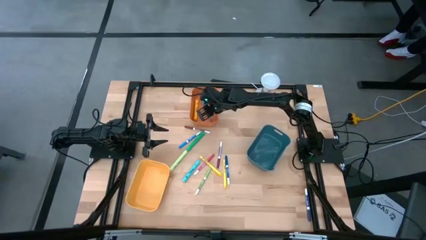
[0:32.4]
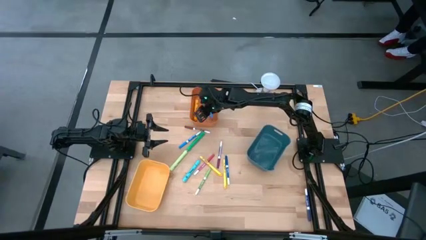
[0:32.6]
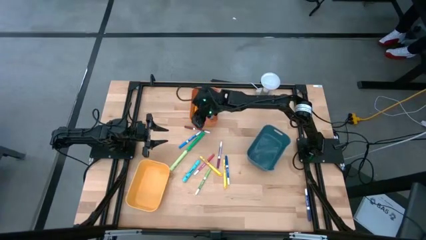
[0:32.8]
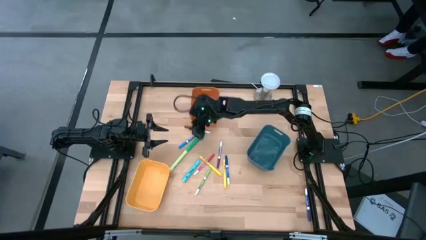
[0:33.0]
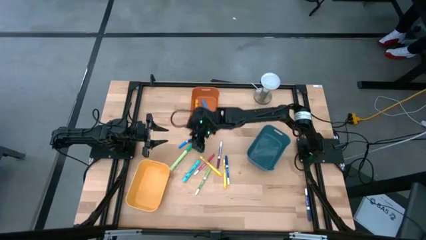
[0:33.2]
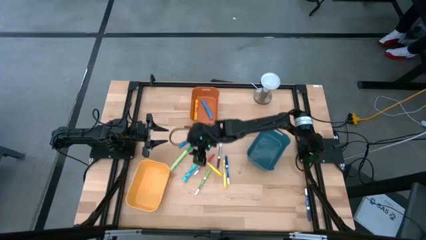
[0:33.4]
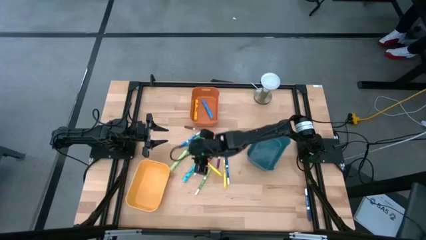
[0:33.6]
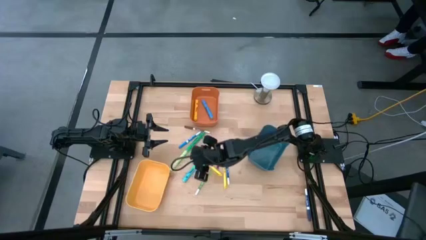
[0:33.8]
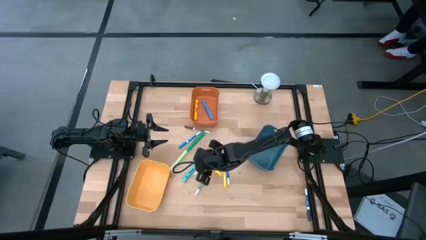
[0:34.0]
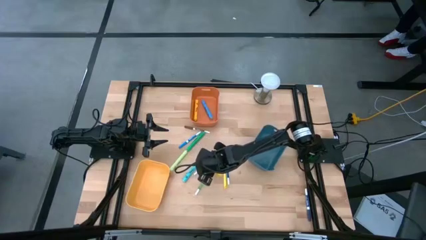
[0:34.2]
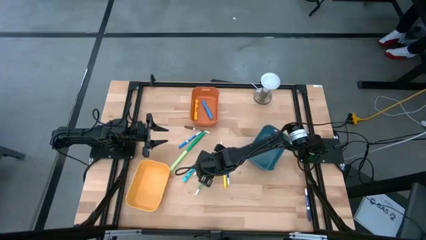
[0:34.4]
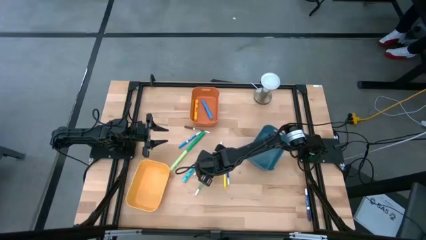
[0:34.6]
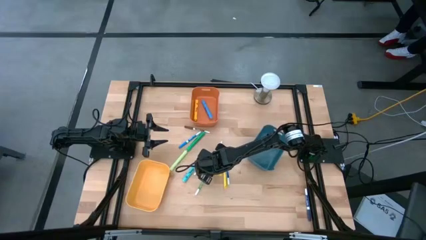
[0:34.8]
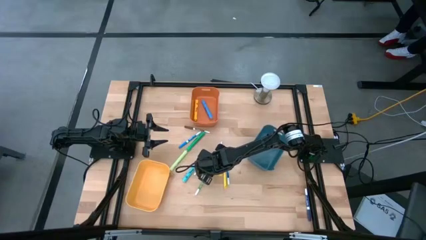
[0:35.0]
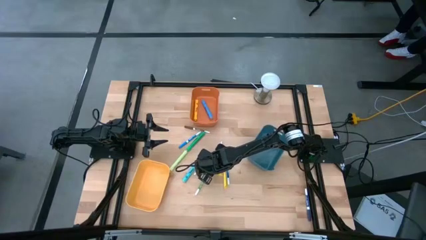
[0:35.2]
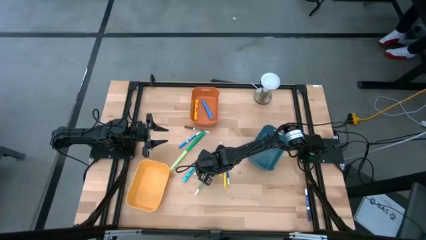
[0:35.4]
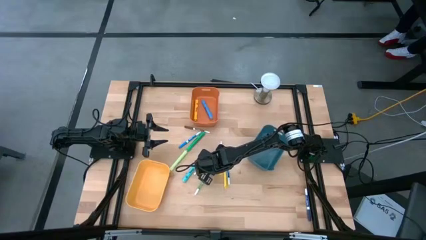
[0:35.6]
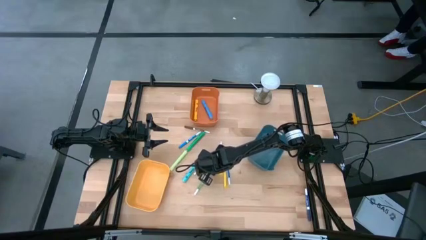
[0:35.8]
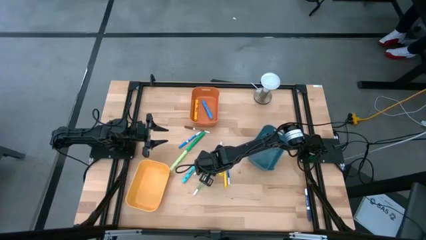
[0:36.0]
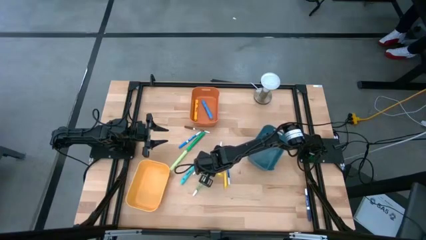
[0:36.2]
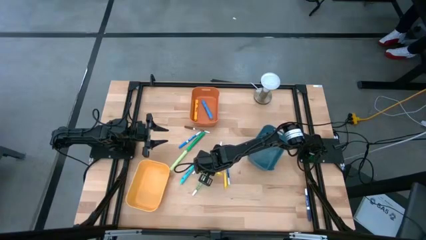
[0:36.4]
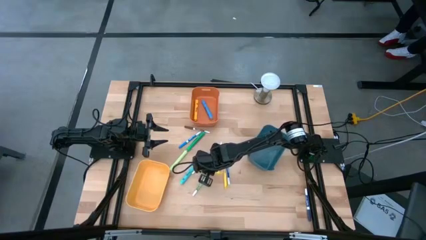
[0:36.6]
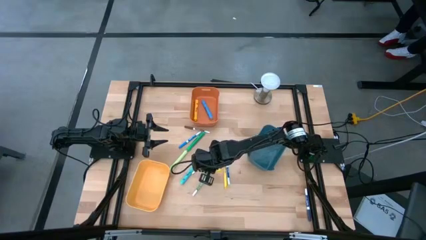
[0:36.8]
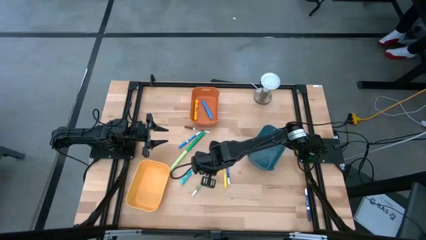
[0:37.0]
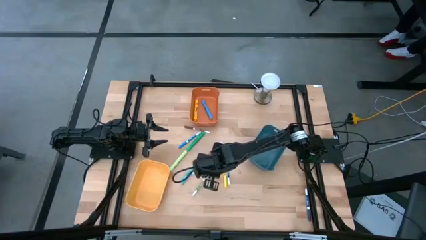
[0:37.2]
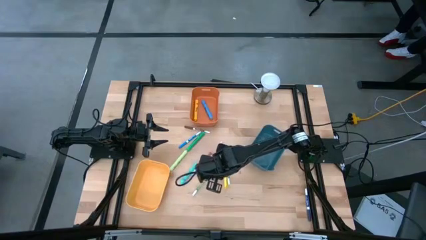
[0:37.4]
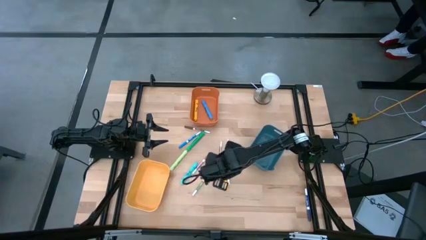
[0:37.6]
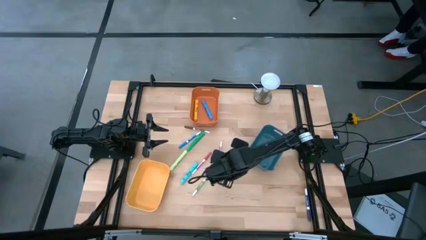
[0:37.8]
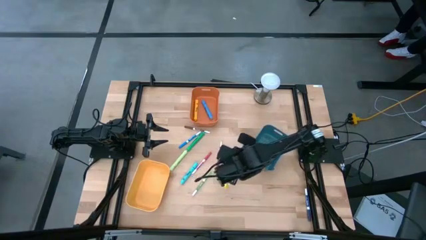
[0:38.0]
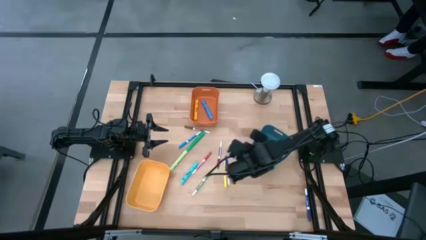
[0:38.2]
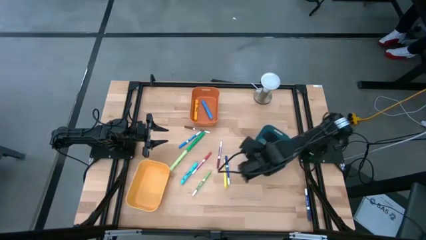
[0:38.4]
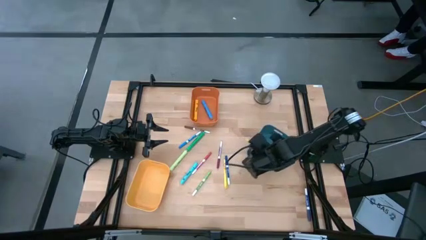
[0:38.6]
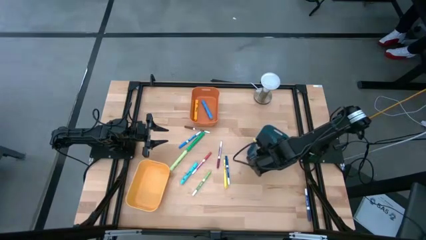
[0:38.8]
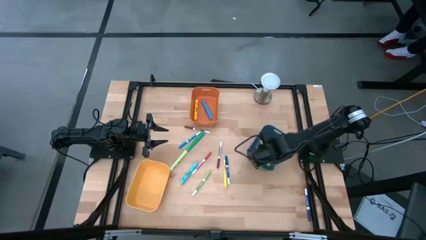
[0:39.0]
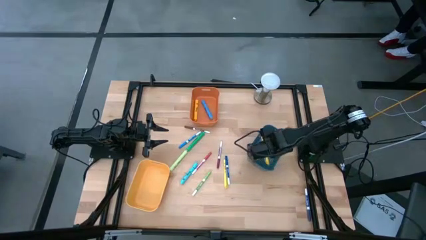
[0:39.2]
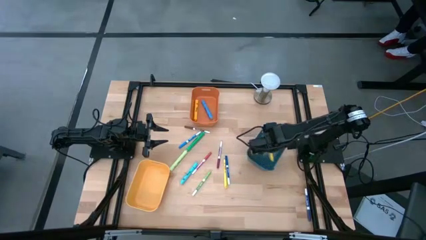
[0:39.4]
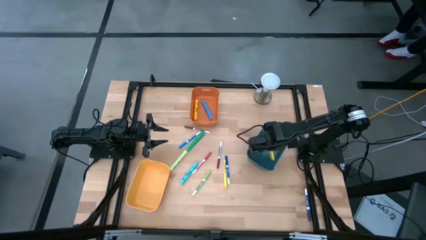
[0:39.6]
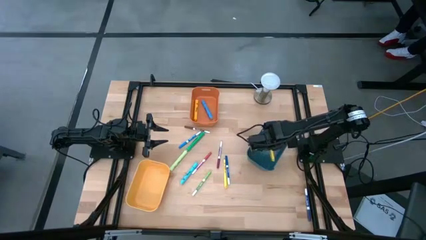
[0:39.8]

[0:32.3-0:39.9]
Task: Pick & Place Markers
Put the left yellow pen into the blue bin

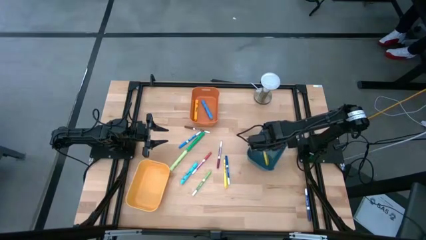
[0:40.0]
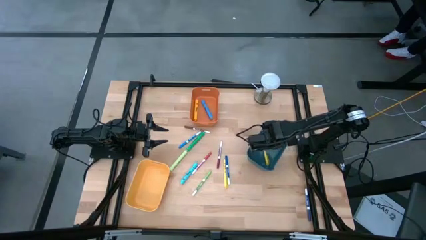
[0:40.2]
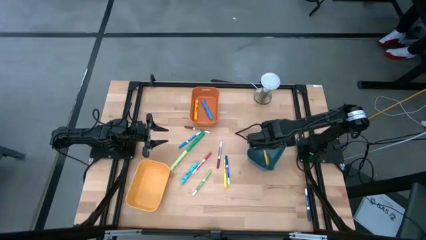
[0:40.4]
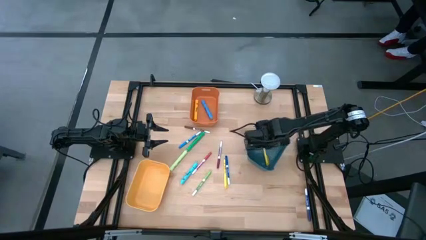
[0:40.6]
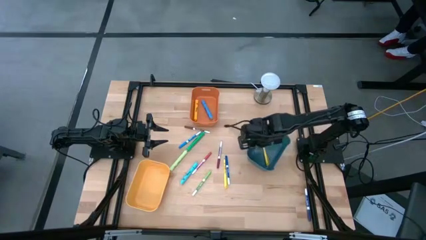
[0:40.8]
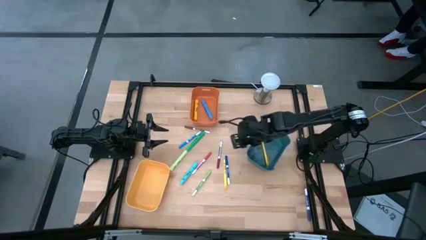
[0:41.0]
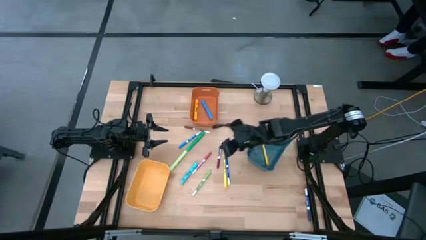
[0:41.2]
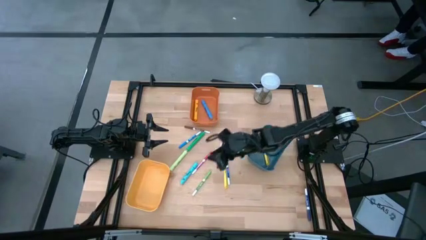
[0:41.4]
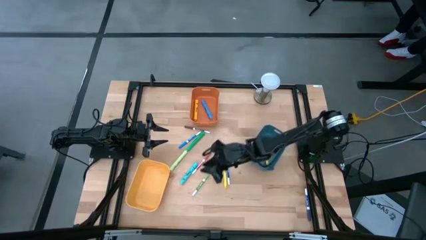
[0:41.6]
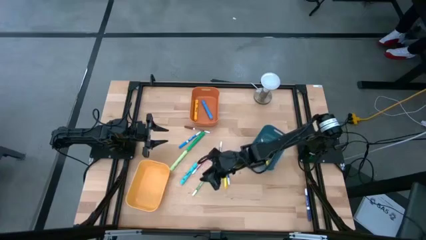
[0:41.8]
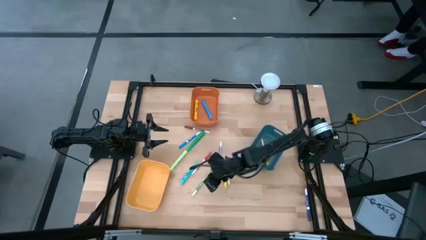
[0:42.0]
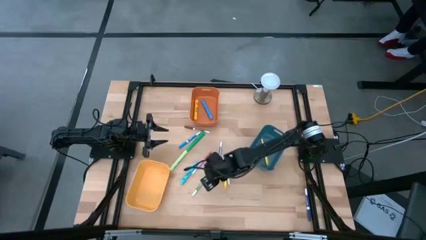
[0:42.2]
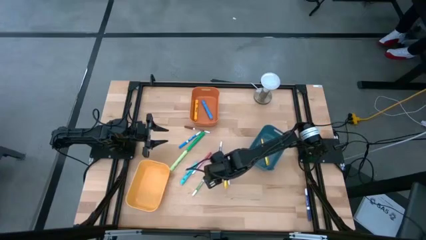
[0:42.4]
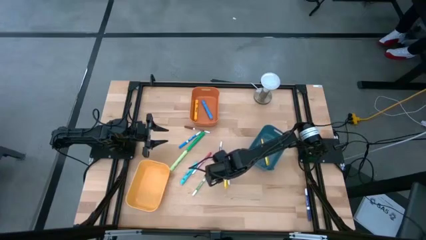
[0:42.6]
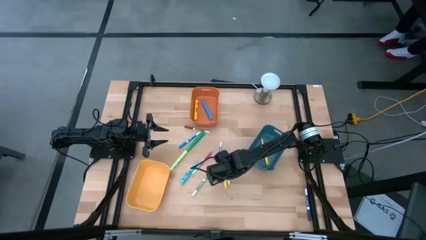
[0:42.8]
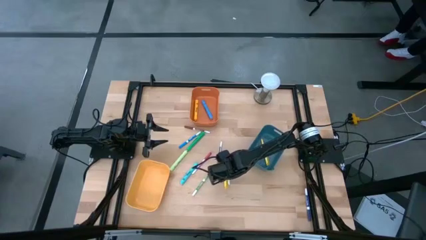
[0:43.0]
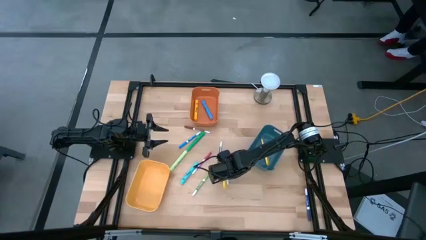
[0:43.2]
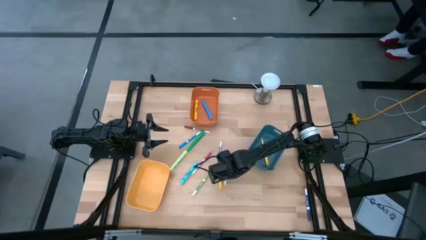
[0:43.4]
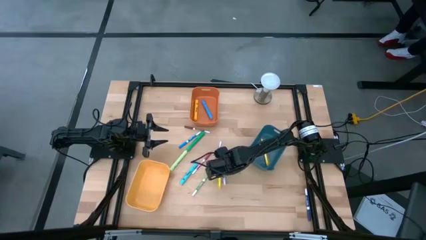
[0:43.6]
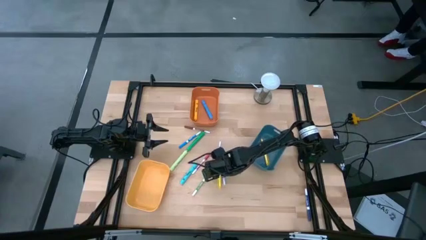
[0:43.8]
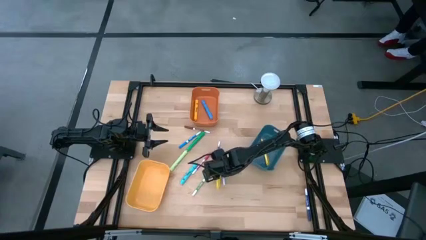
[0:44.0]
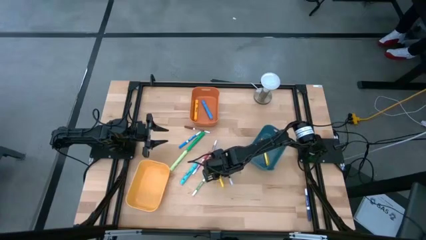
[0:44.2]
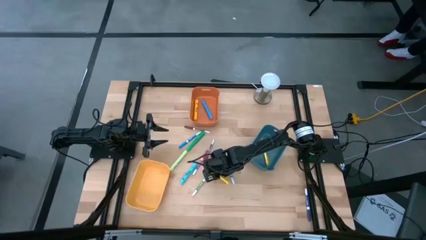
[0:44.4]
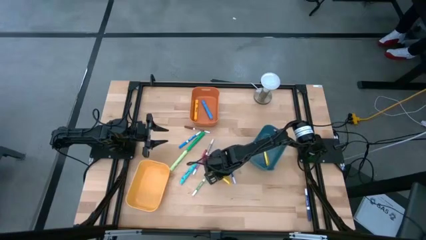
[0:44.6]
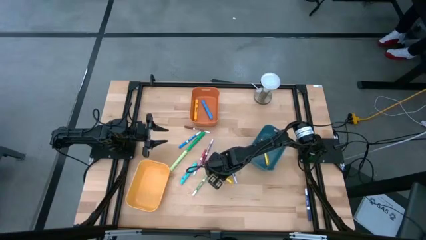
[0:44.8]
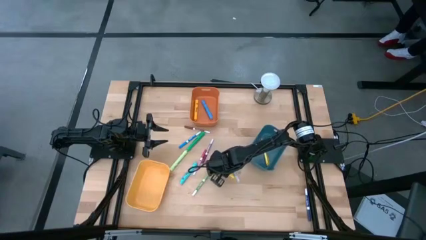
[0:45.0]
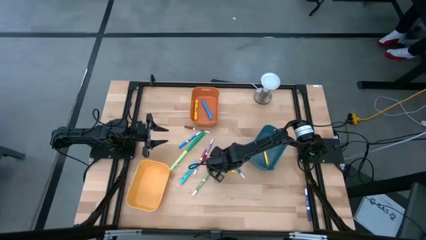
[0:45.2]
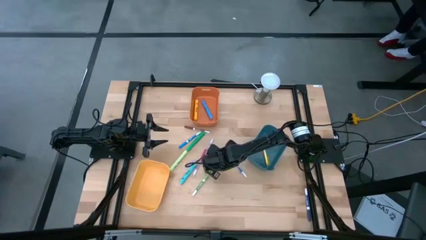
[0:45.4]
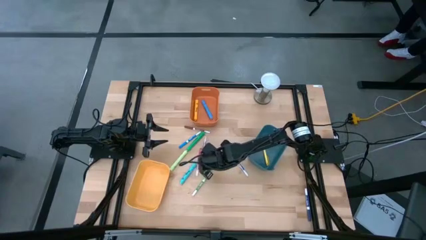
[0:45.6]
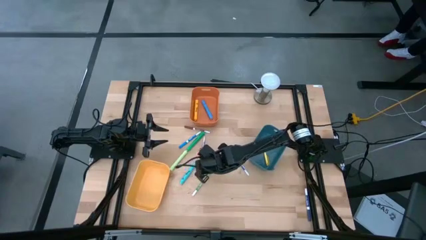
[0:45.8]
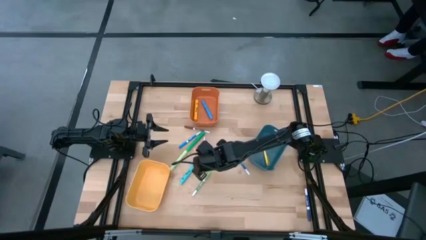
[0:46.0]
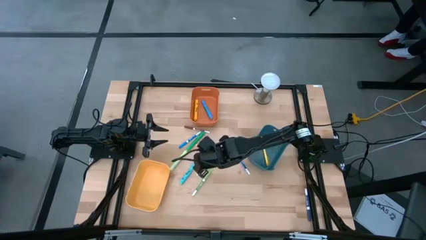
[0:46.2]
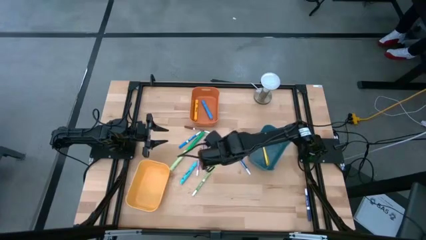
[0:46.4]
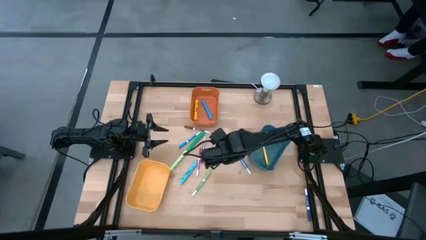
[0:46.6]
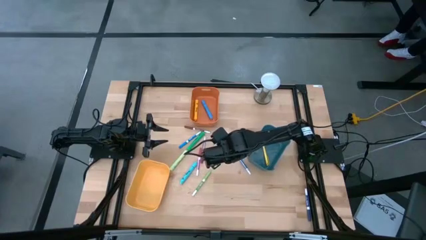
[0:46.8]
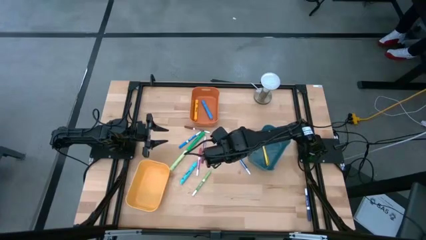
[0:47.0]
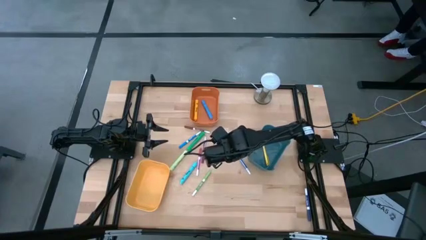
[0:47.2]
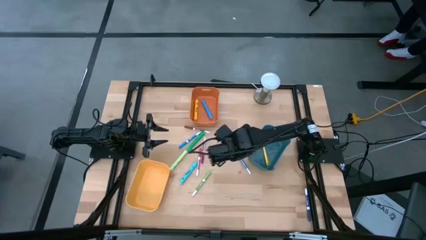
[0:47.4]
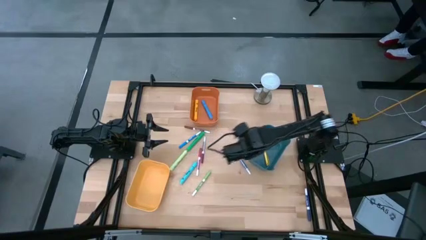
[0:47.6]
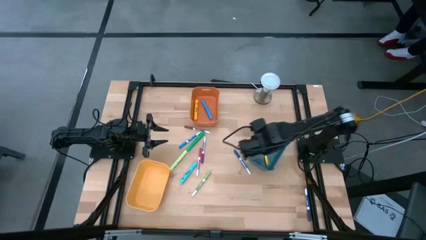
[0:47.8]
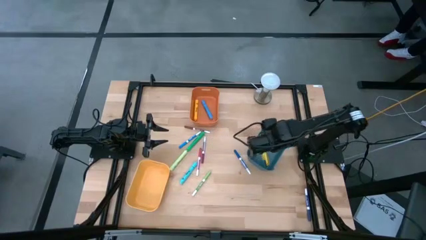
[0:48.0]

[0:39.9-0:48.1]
Put the yellow pen into the blue bin

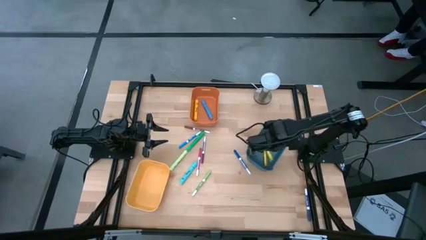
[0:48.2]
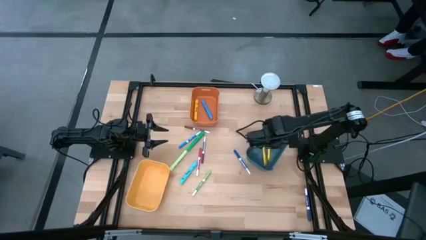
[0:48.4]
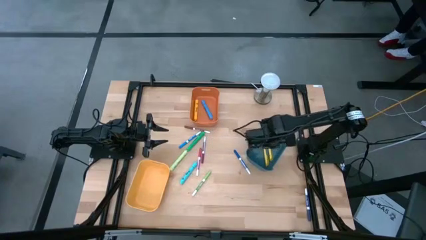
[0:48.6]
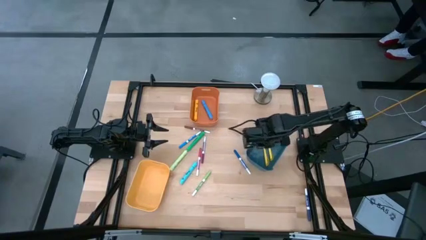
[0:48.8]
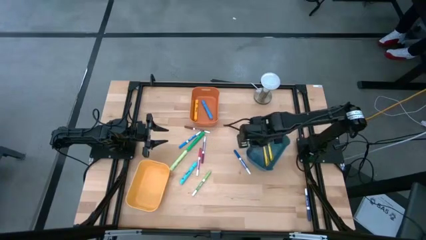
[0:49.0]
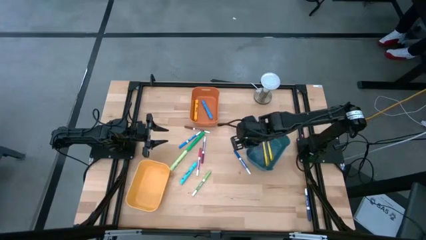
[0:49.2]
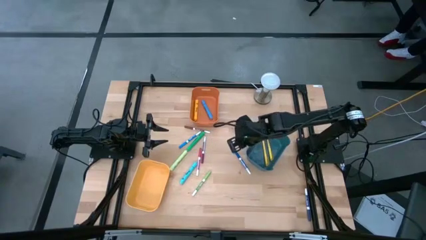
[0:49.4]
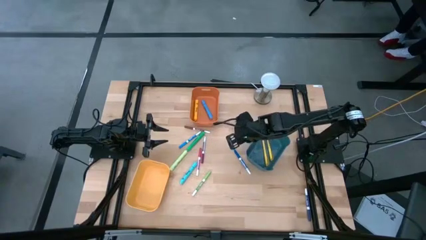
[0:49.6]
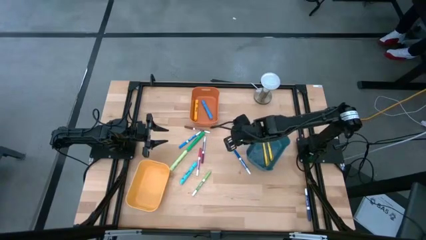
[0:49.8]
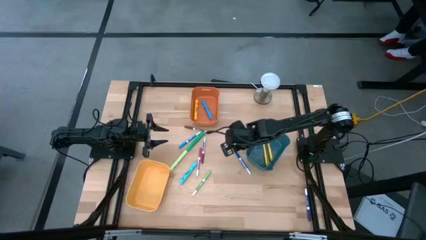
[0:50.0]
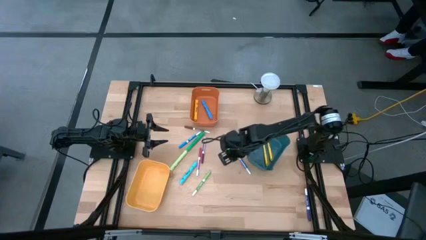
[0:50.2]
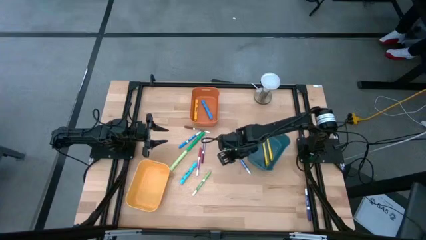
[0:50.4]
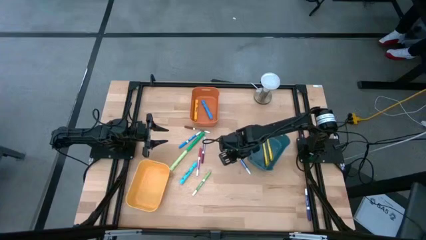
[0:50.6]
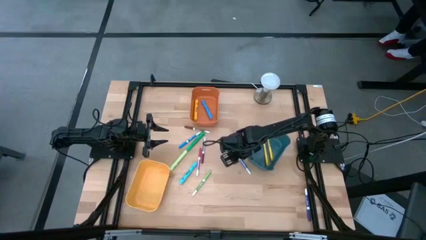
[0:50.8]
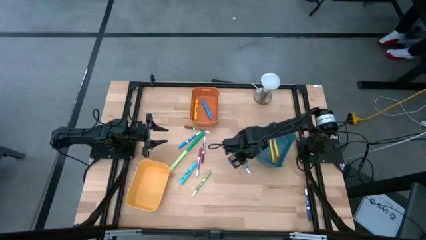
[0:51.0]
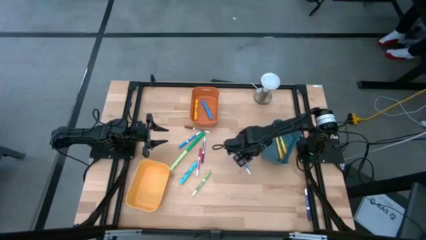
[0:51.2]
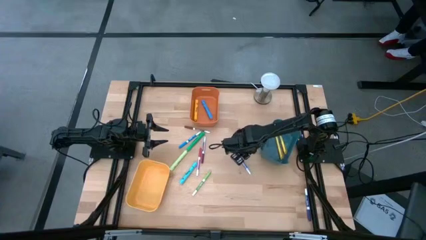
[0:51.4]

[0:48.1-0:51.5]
Move the blue bin to the right side of the table
